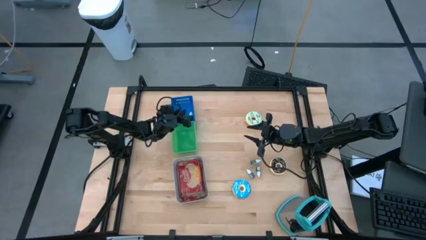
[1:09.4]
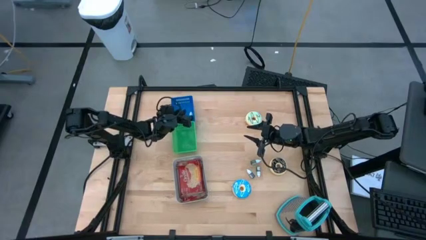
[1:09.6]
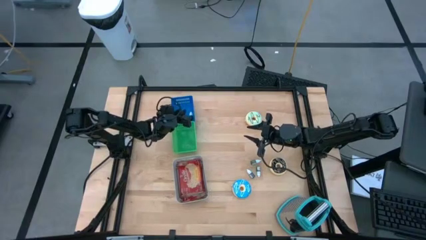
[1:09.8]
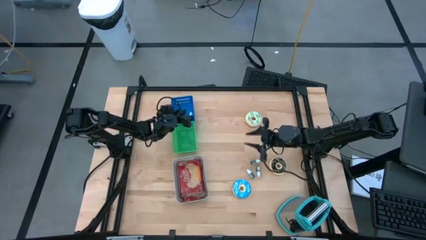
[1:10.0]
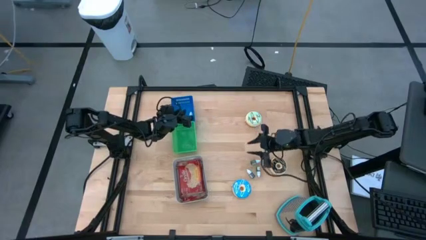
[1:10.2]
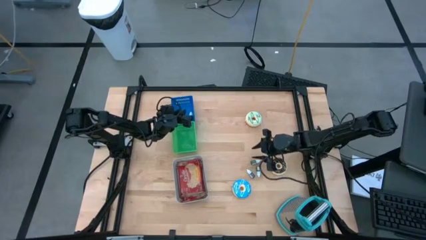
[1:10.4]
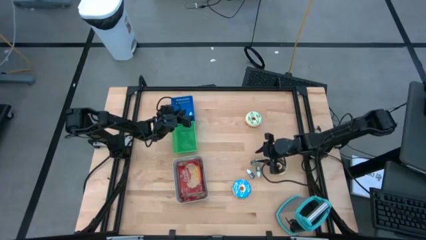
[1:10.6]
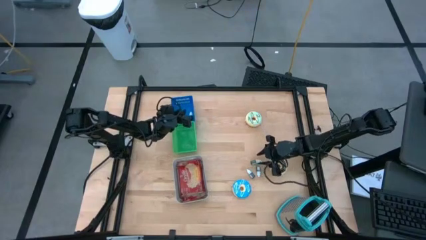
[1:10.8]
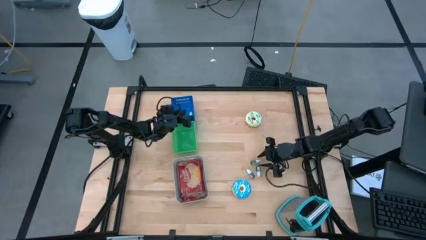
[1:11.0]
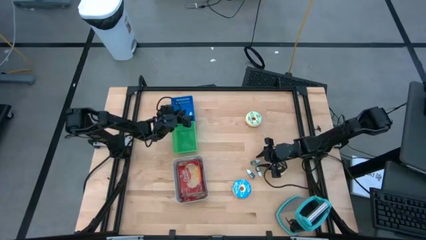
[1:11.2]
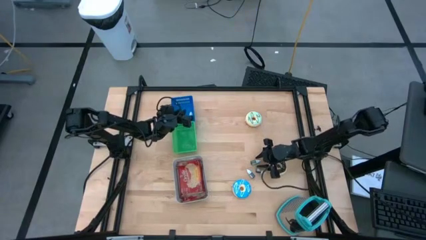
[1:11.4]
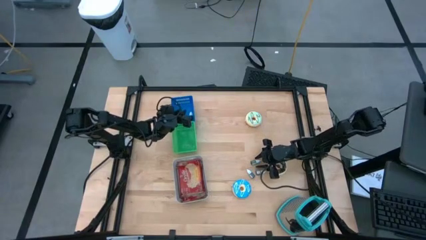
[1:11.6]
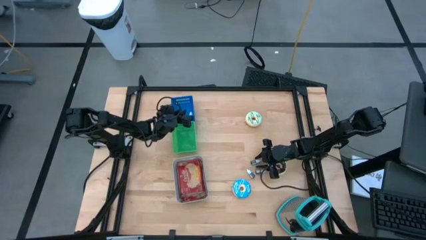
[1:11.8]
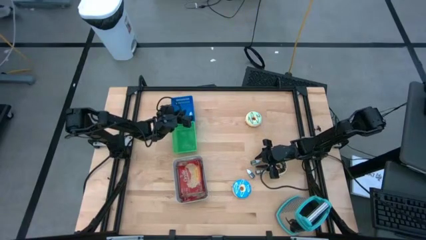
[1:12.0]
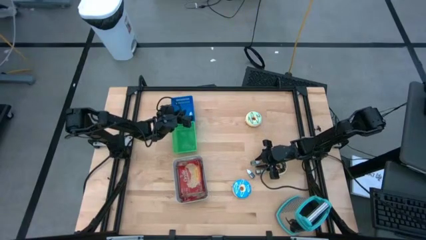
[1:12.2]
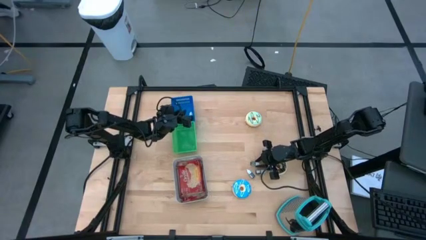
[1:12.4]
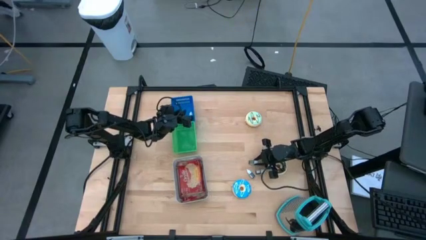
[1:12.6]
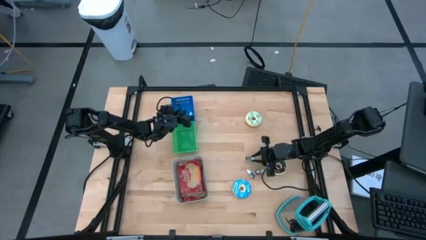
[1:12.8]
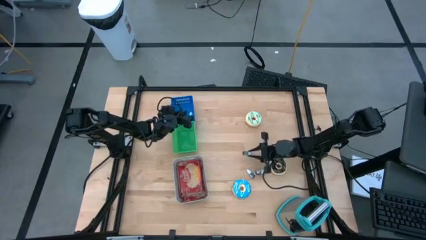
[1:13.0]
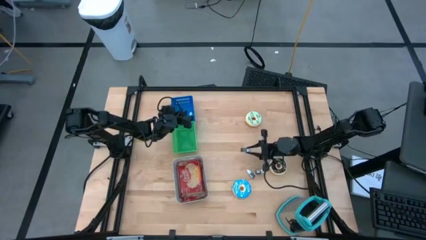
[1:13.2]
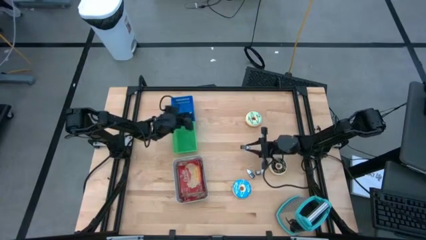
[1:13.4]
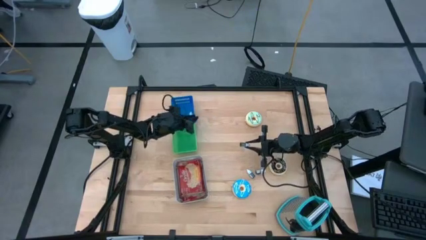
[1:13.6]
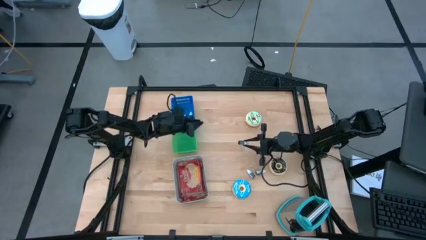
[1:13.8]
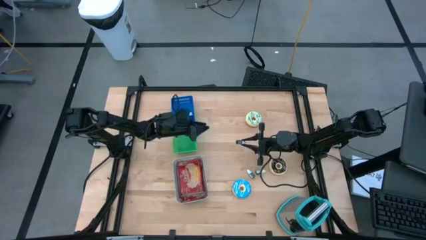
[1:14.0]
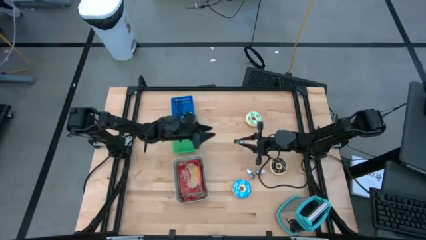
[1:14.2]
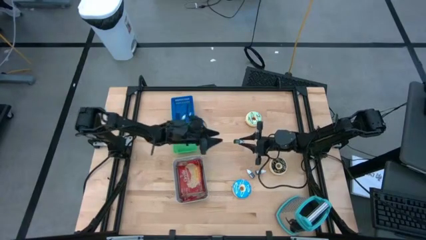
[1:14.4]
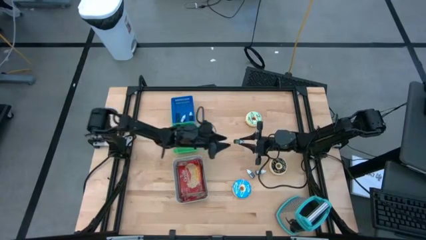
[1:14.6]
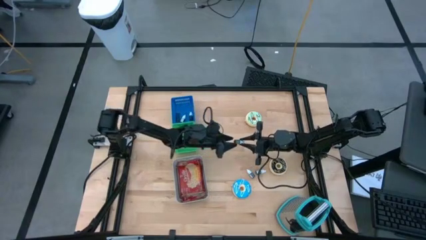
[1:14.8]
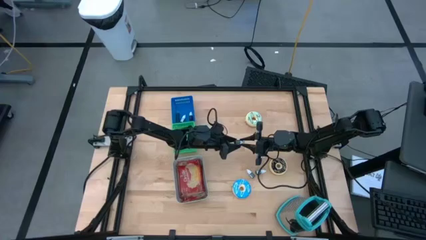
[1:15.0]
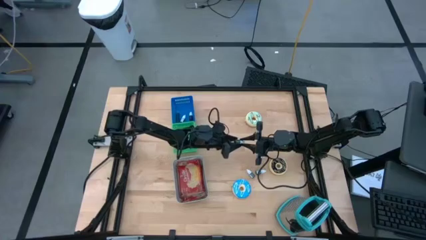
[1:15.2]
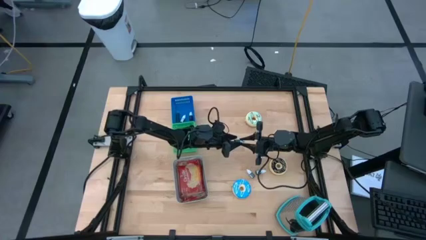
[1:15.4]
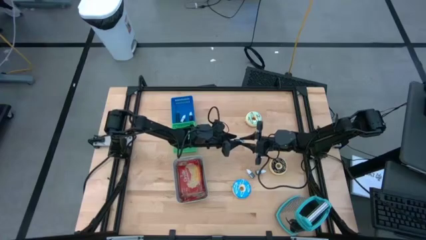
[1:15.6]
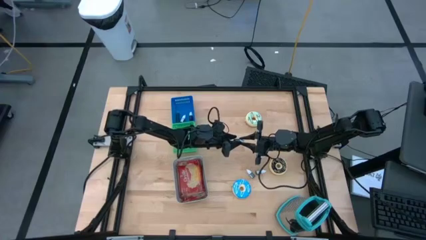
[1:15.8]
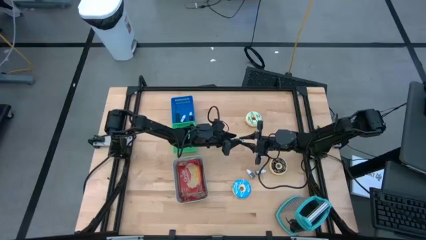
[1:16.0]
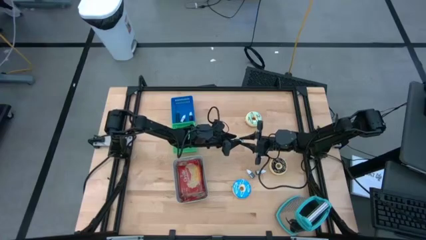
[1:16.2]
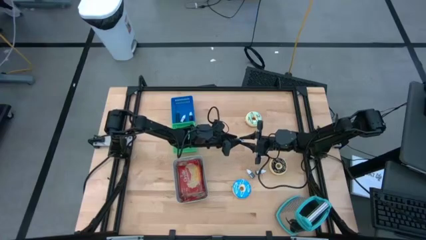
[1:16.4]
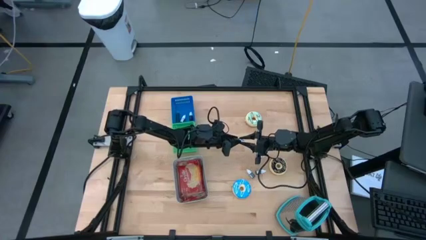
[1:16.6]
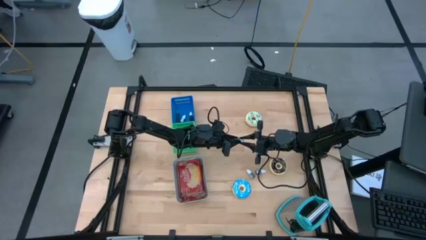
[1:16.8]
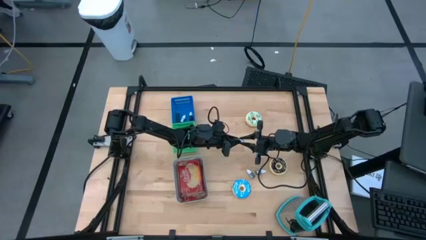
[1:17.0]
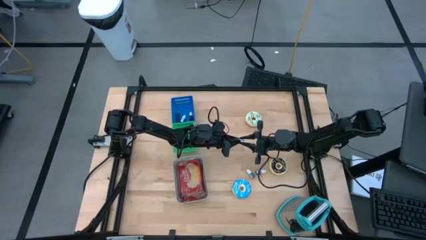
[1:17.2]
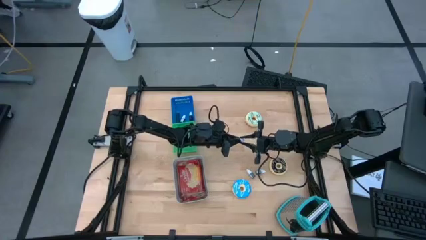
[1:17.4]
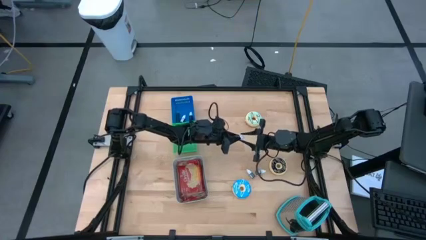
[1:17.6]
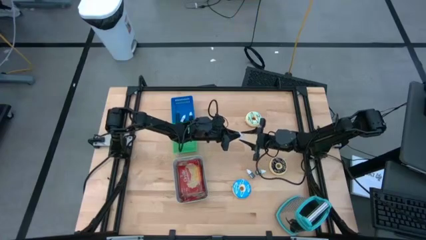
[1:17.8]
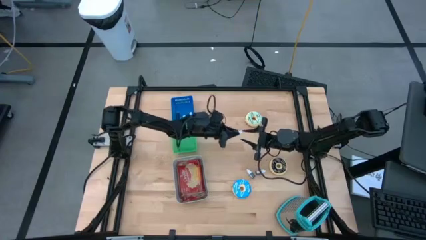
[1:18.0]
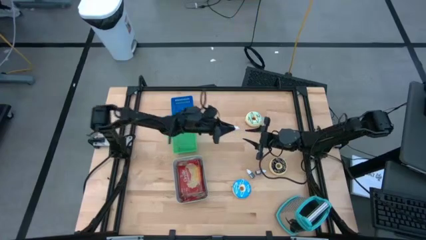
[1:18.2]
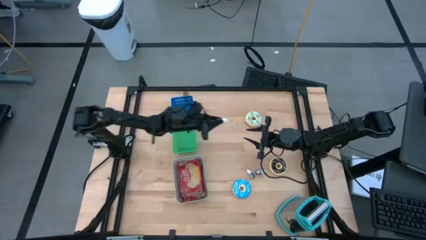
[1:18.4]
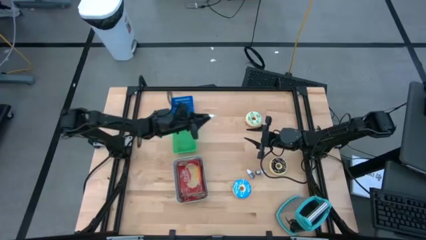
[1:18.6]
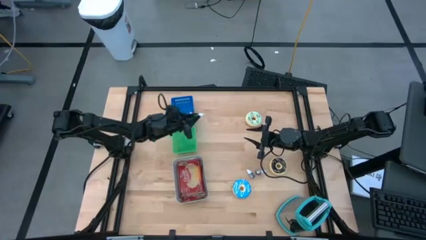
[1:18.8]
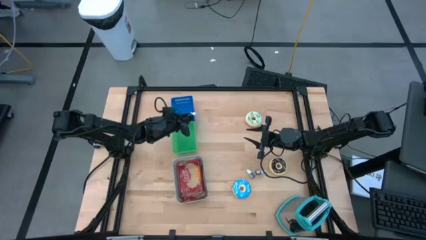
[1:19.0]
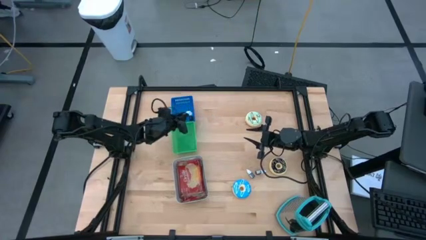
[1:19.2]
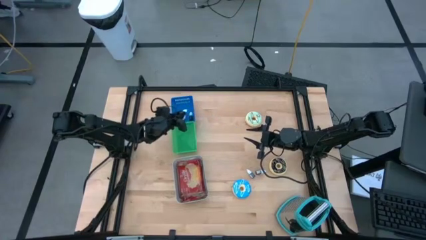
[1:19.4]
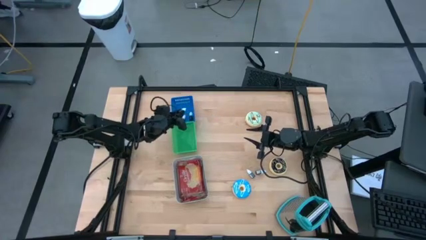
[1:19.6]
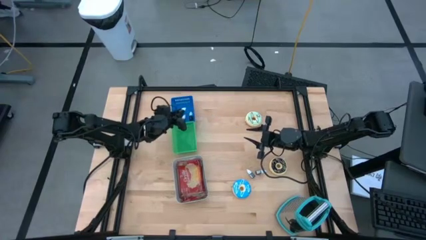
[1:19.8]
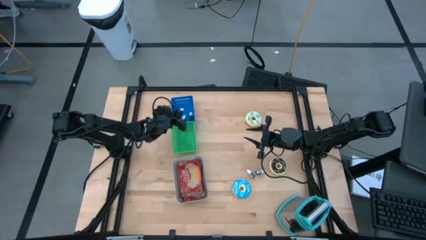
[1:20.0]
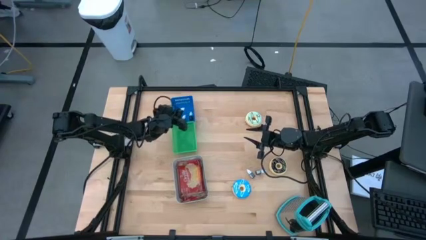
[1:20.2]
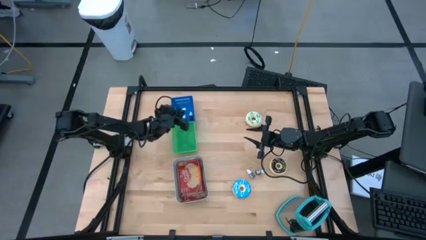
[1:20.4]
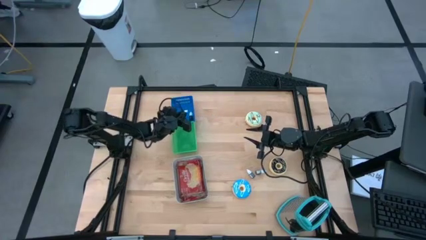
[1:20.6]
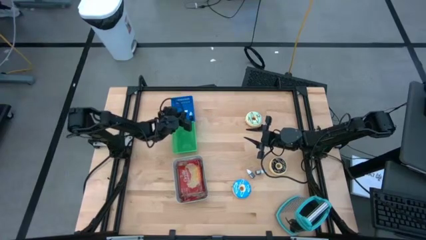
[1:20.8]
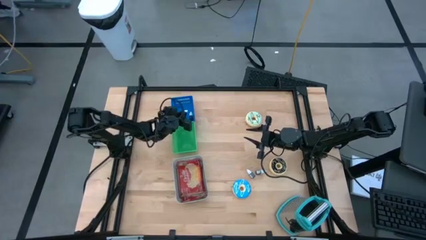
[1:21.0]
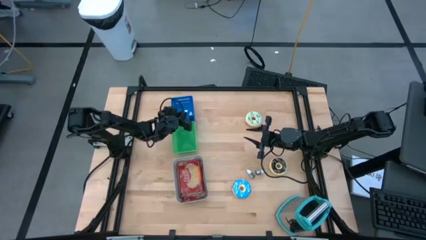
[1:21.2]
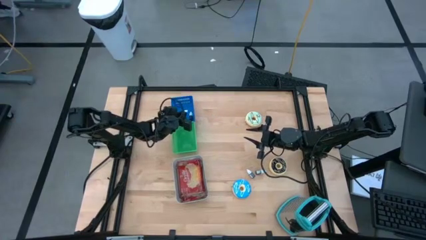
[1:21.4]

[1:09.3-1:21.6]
Task: Pick & Place Food Item
Put the green food coloring bottle into the blue bin

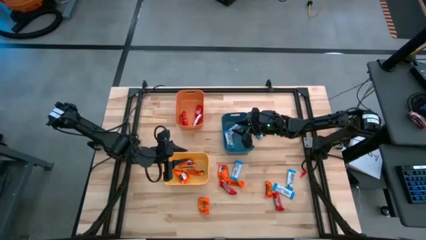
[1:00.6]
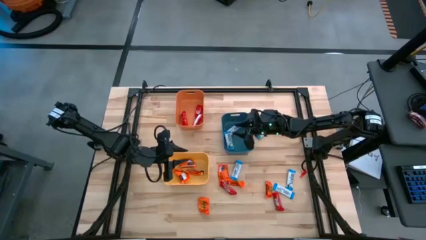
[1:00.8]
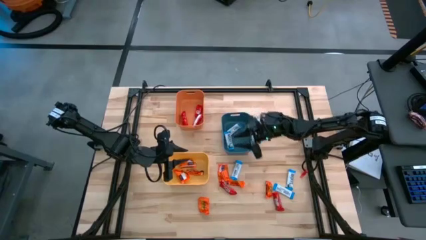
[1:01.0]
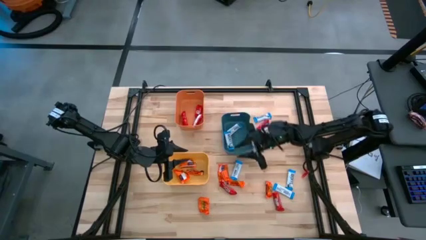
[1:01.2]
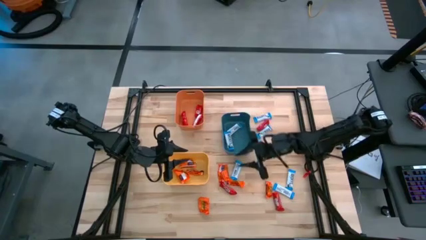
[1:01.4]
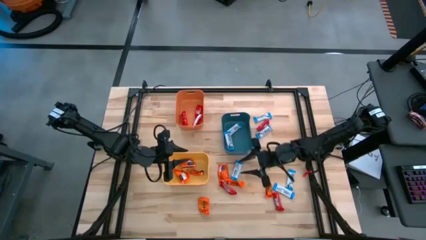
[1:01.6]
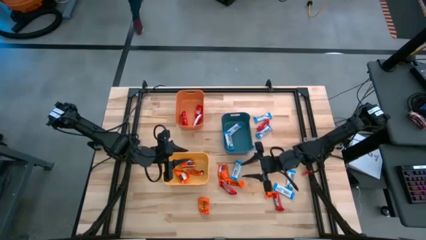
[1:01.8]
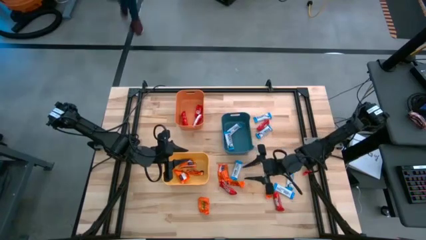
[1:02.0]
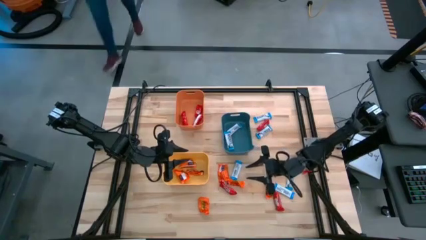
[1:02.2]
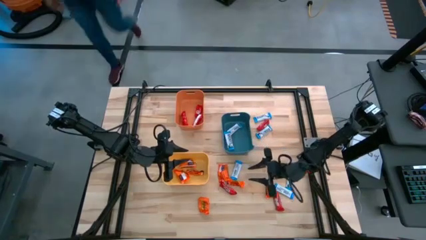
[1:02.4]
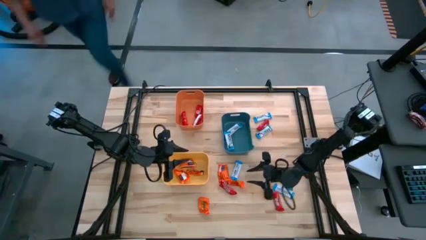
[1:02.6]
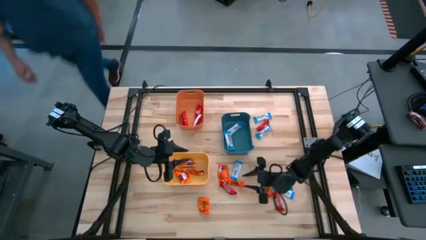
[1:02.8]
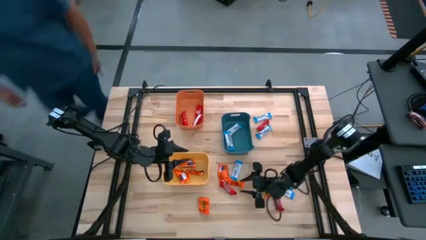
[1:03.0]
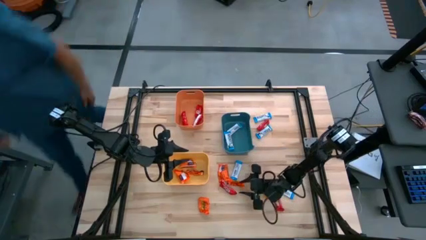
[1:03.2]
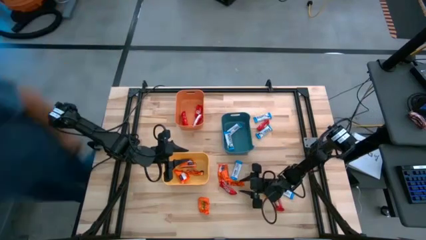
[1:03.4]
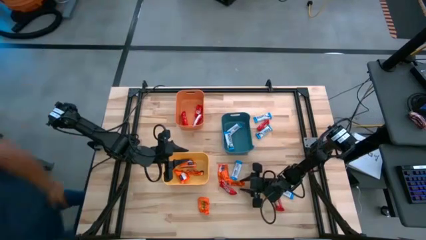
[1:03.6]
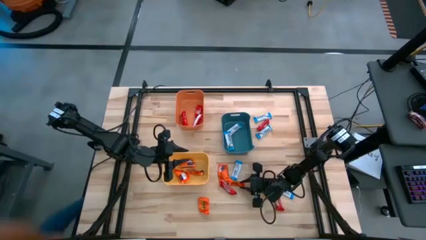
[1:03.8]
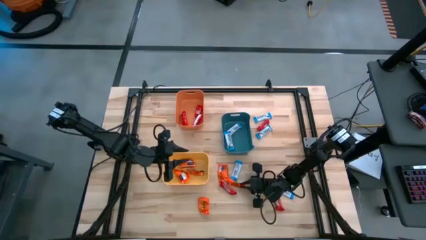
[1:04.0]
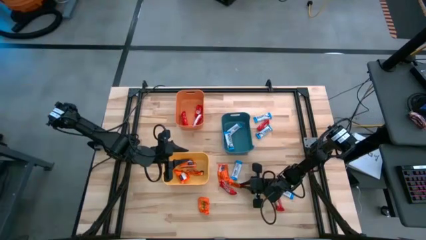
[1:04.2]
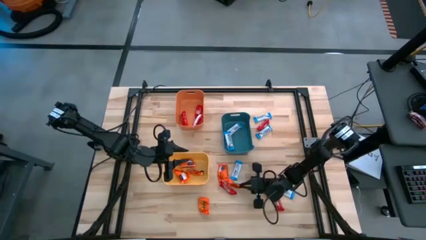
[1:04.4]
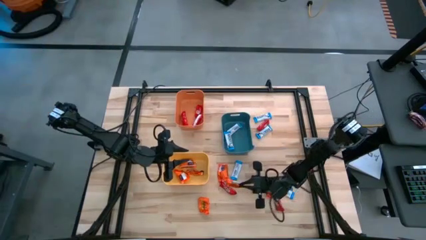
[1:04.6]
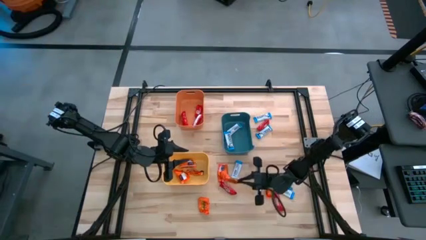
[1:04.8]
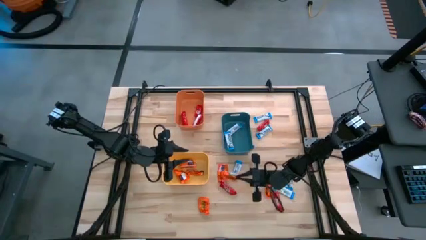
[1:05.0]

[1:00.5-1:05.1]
Task: Organize candy in baskets
Put the orange chocolate into the yellow bin
